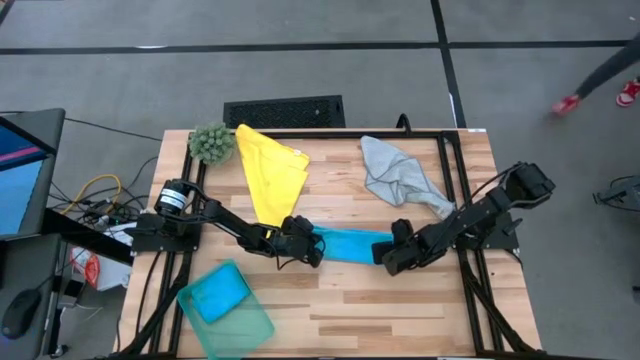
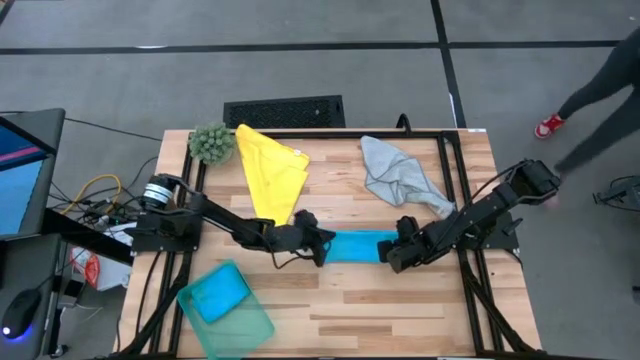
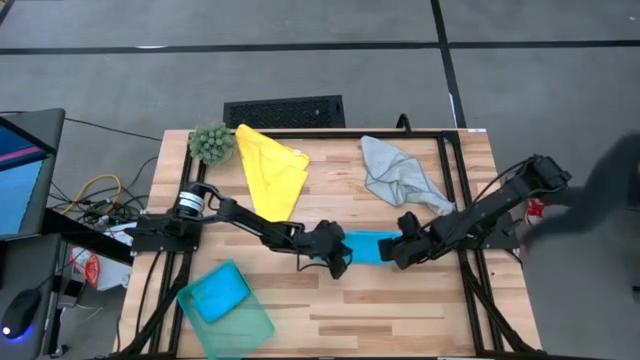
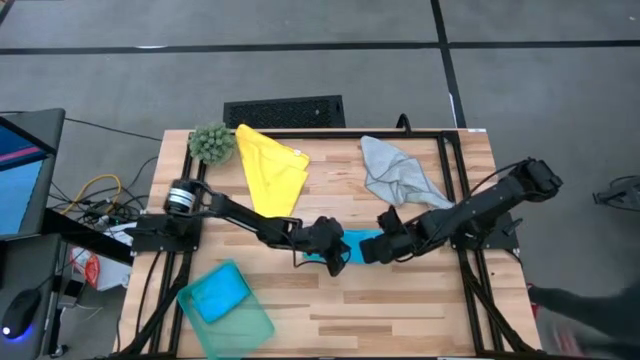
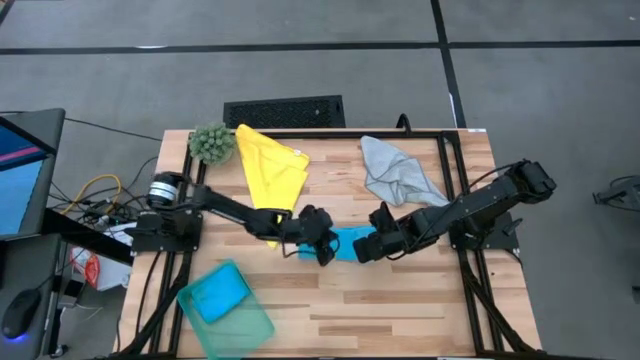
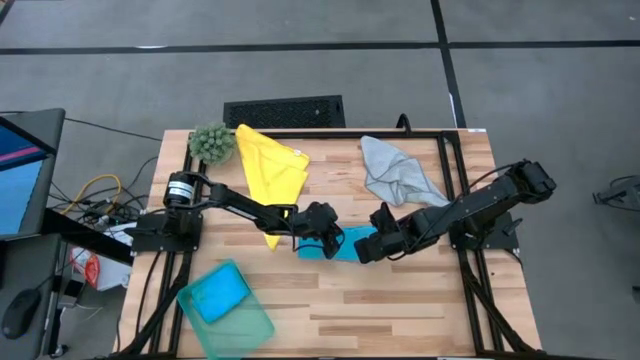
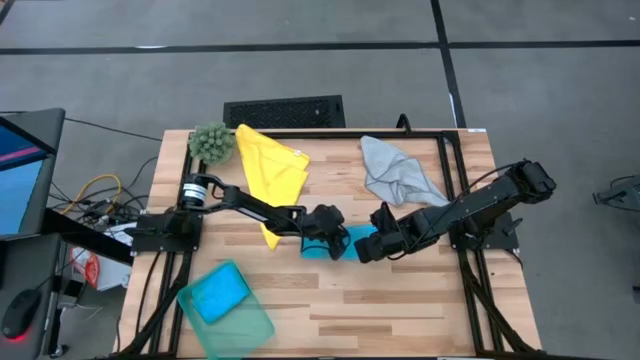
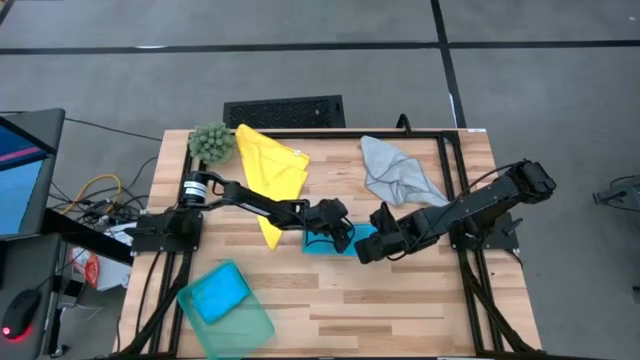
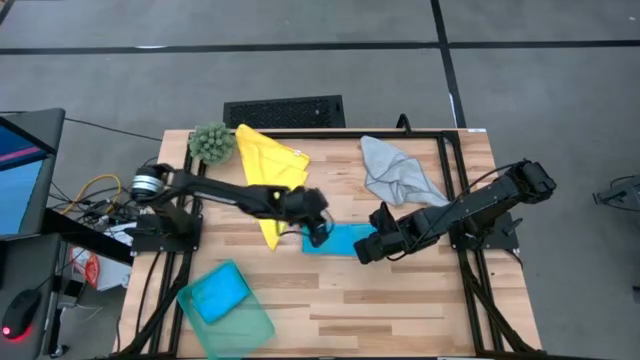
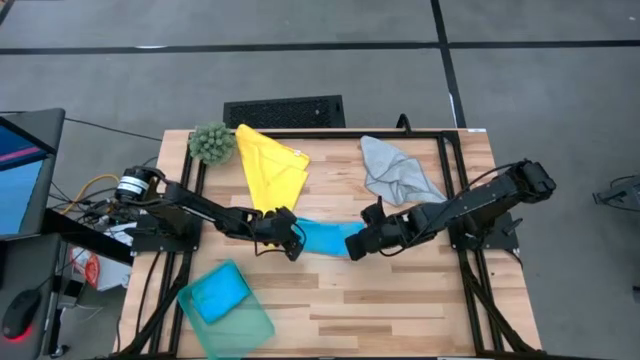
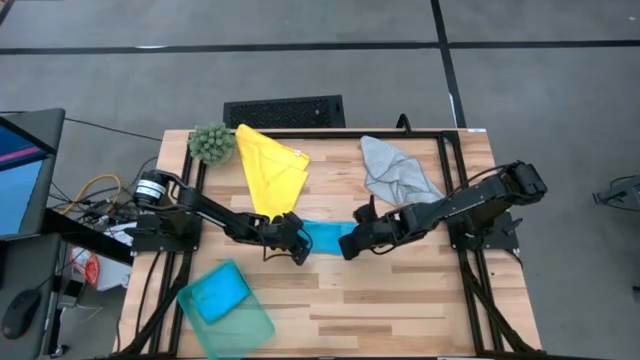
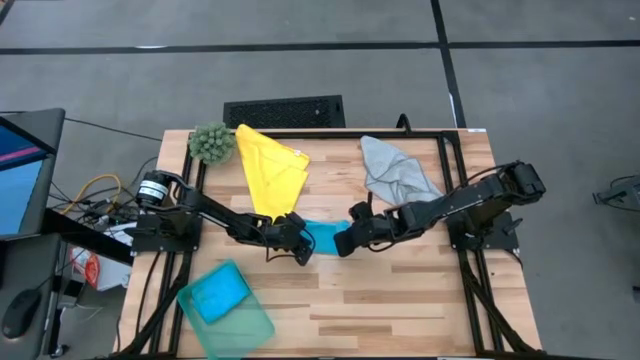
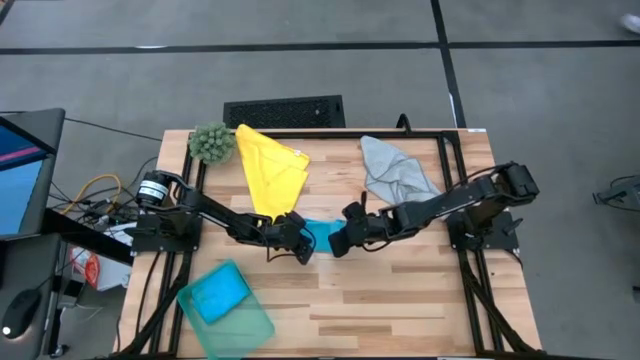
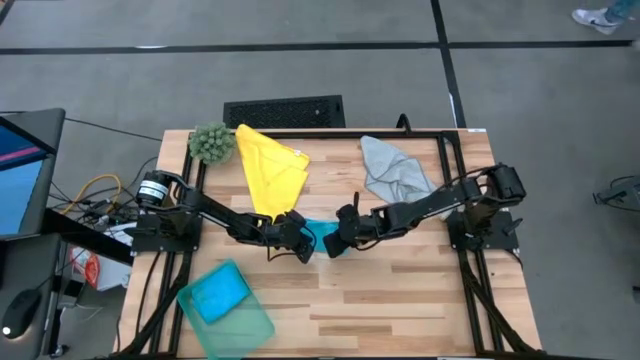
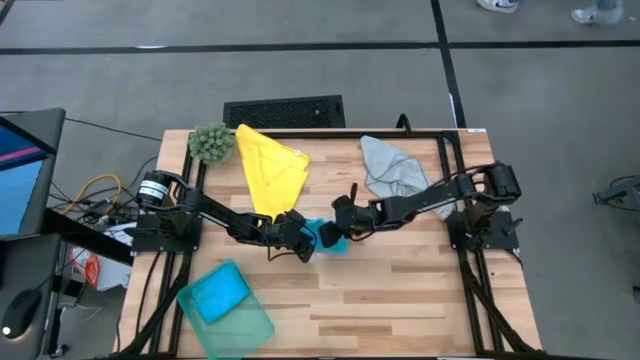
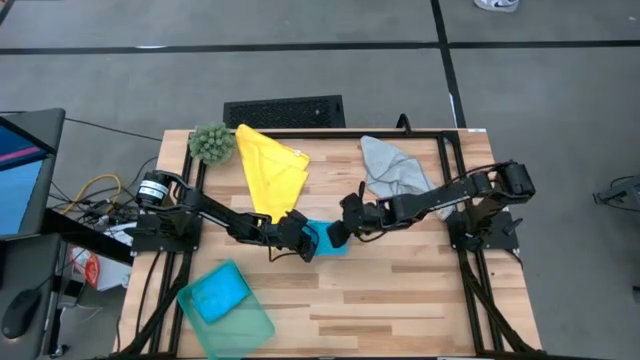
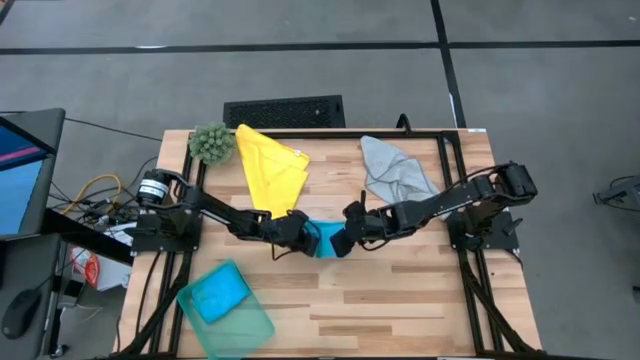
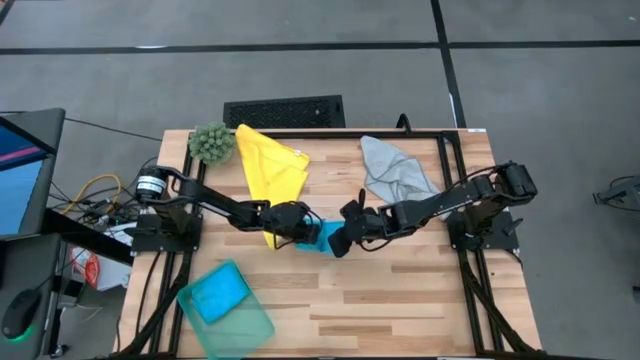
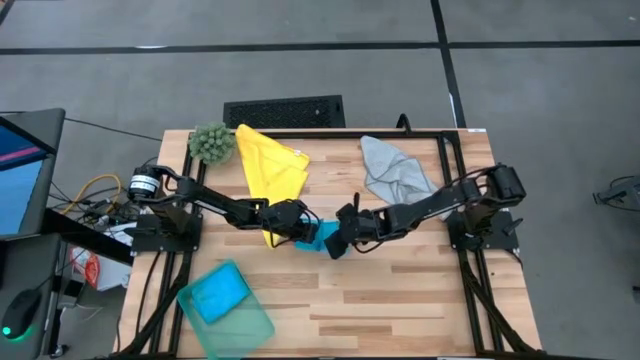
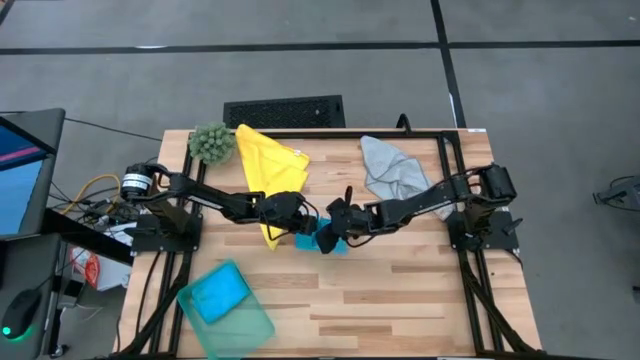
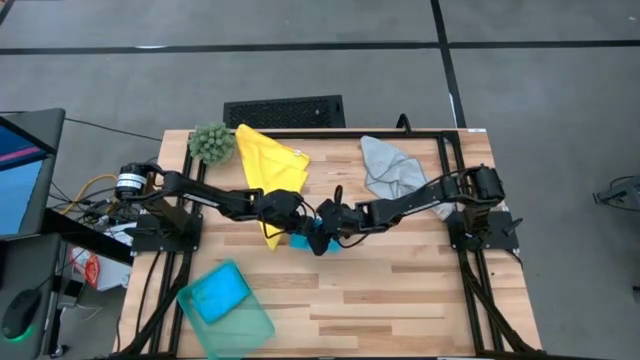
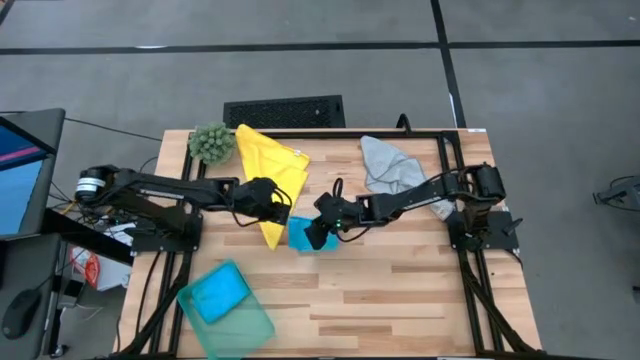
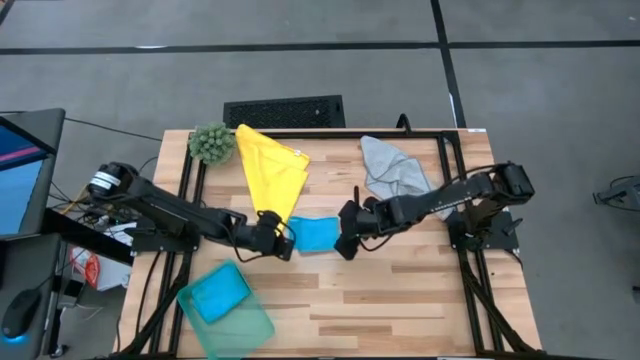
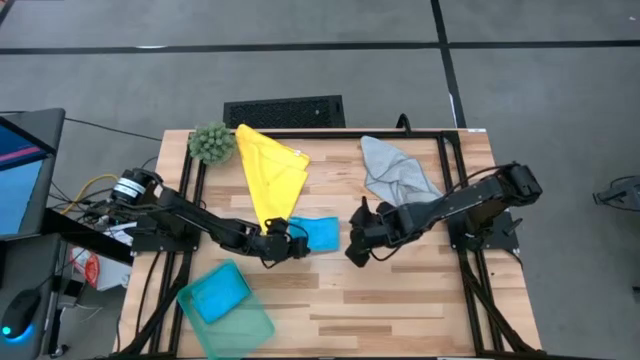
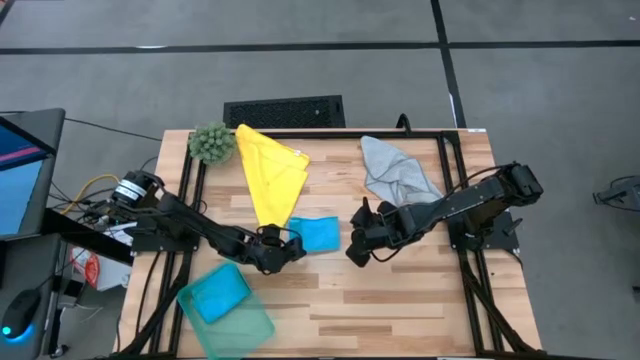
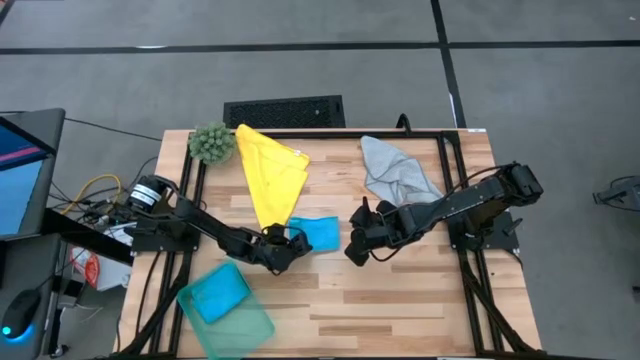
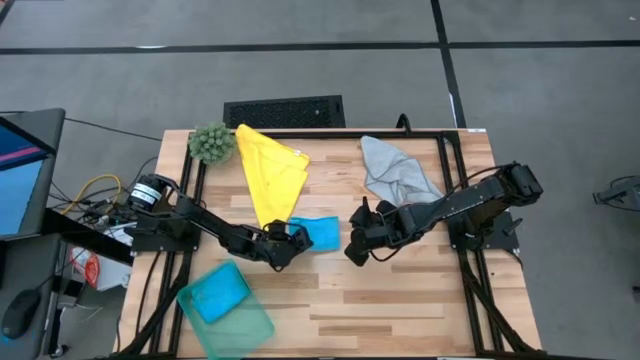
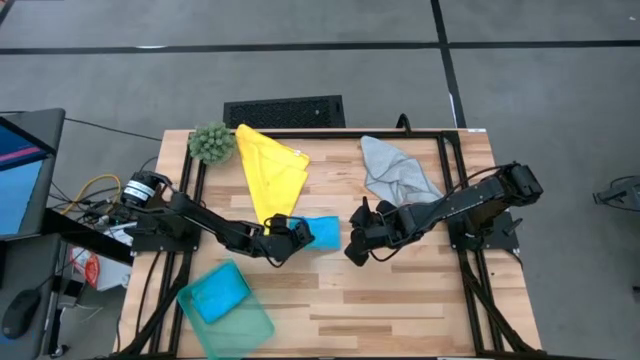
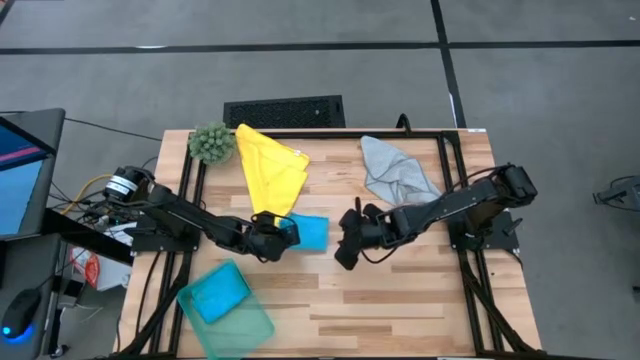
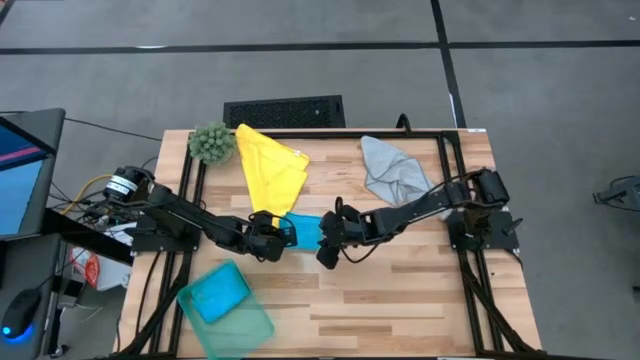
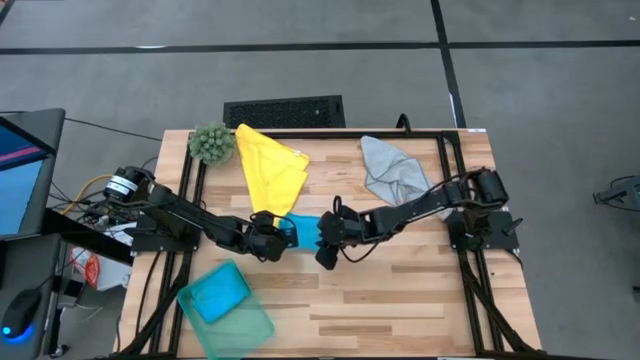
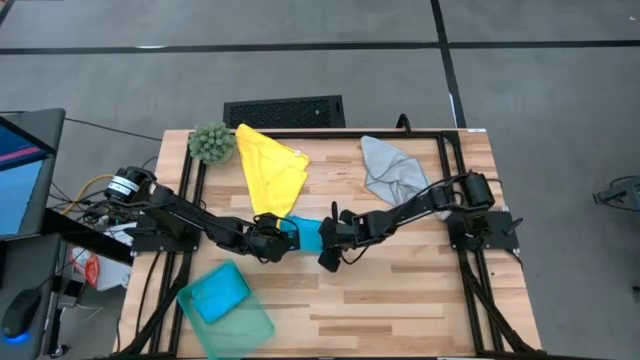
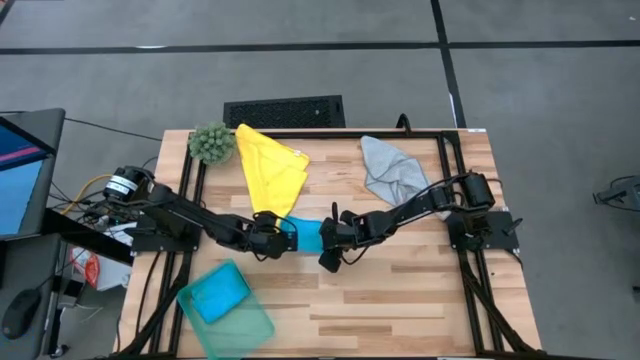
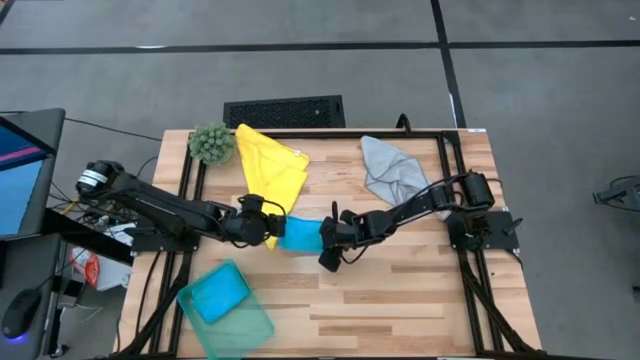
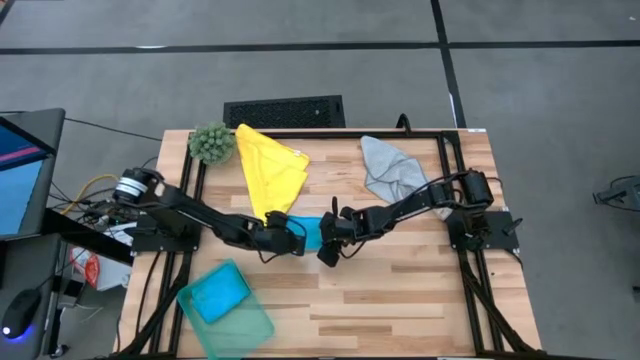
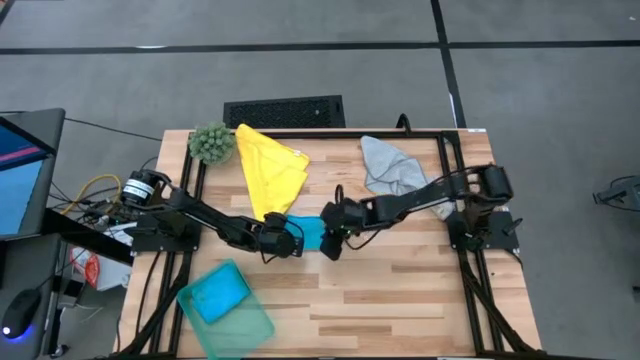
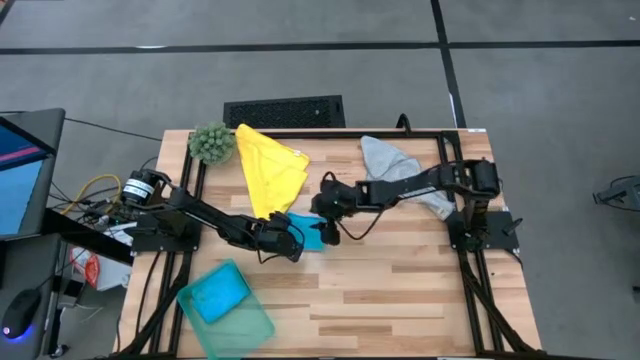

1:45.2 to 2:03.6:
Task: Fold microfiber towels
Fold the blue towel

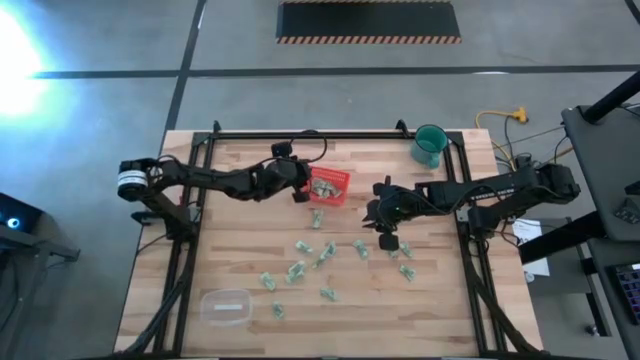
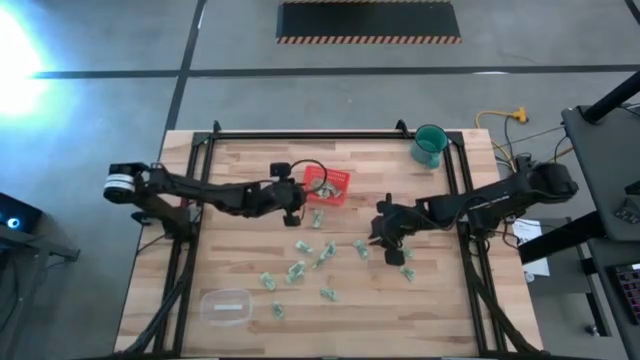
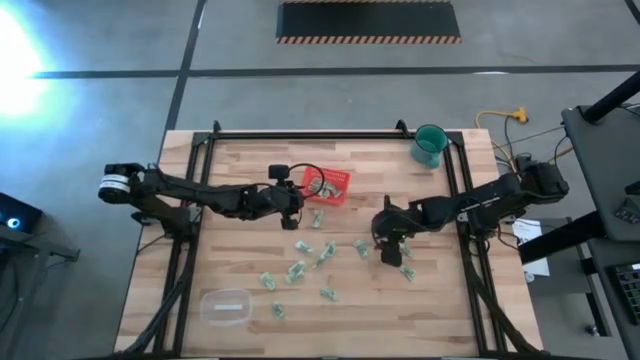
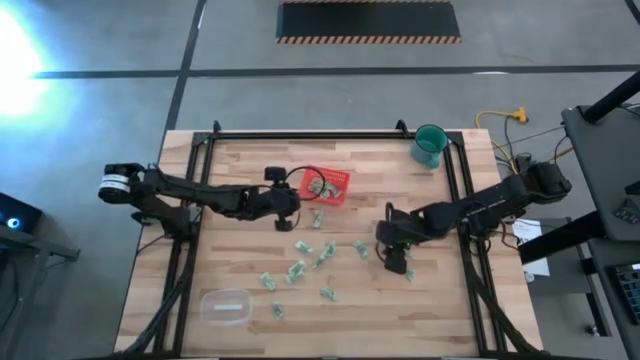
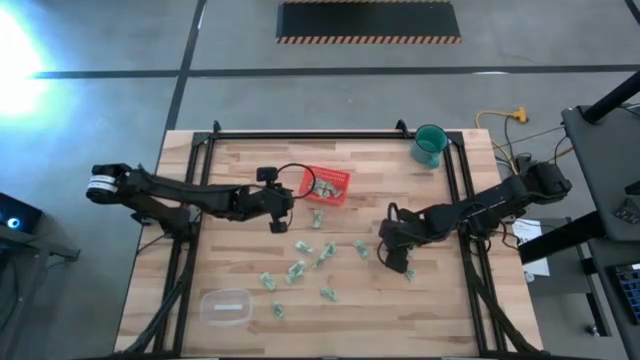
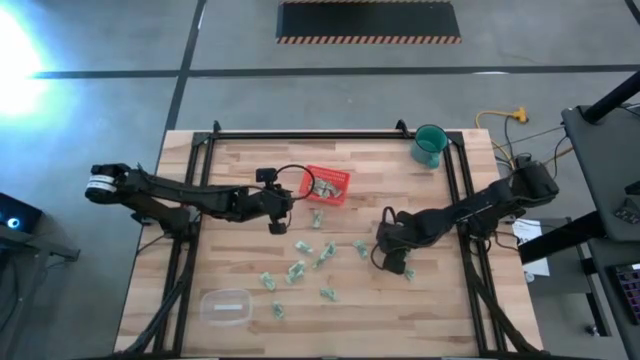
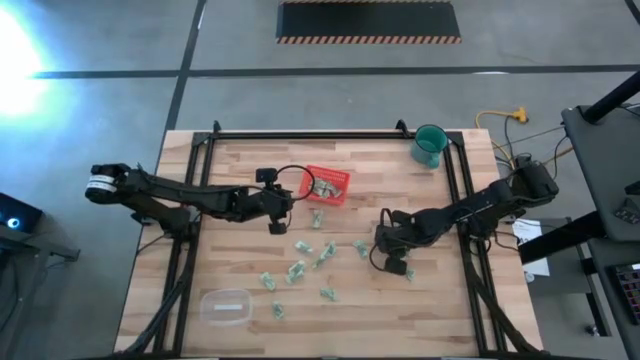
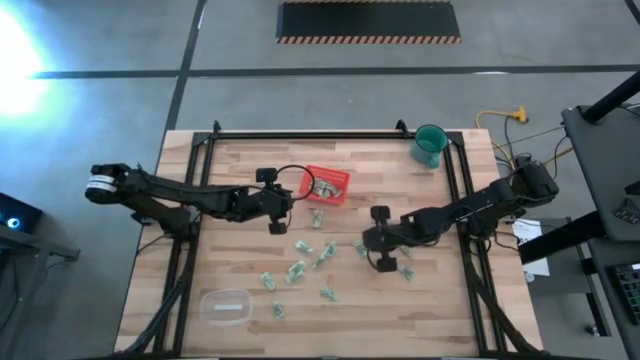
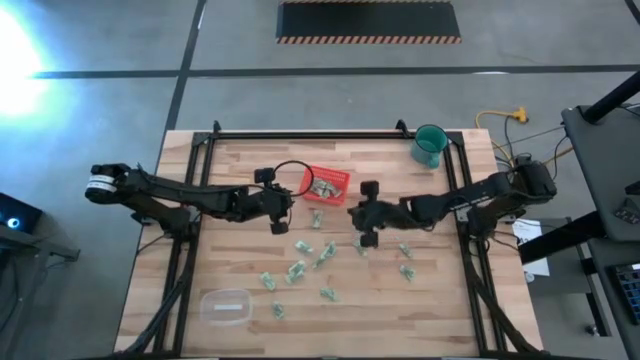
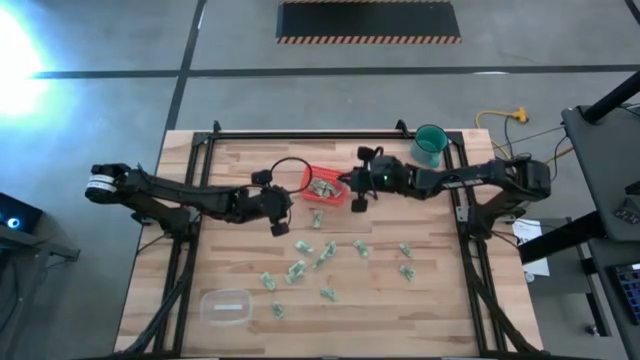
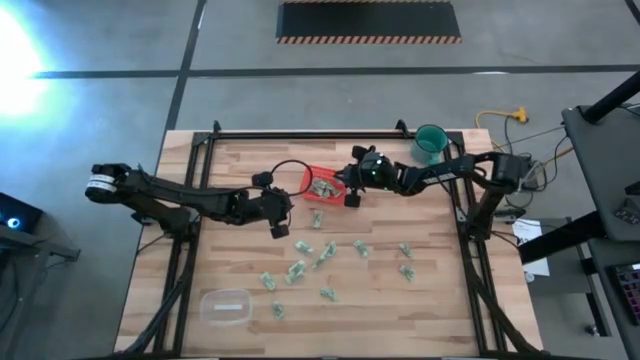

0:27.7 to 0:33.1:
Task: Pick and place items into bin
Put the stevia packet into the orange bin
